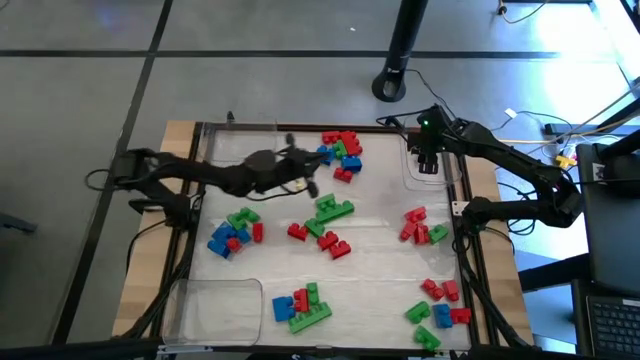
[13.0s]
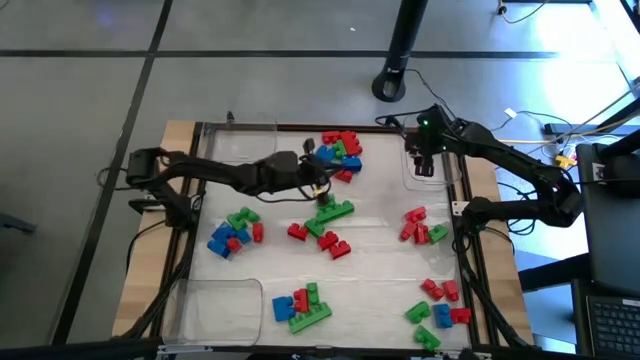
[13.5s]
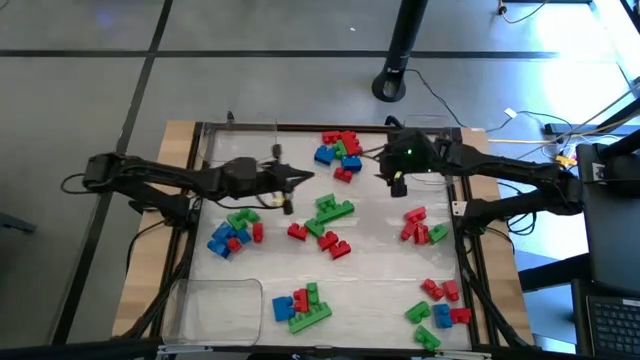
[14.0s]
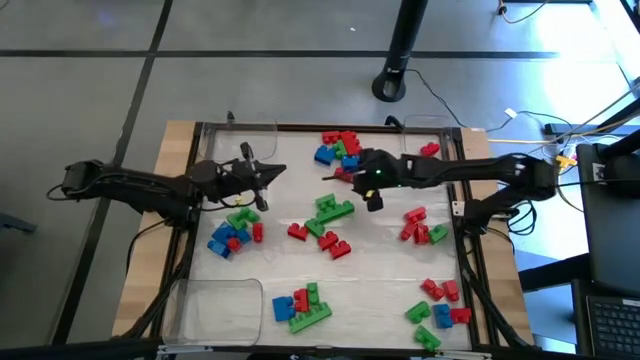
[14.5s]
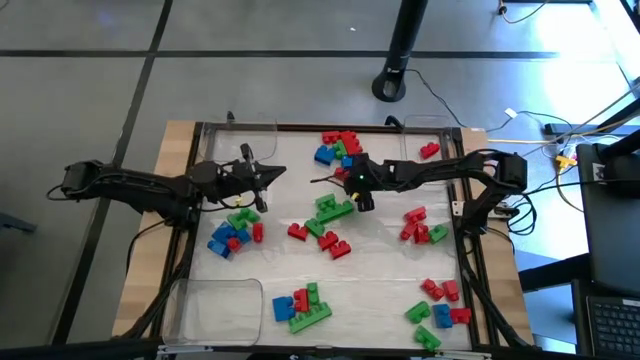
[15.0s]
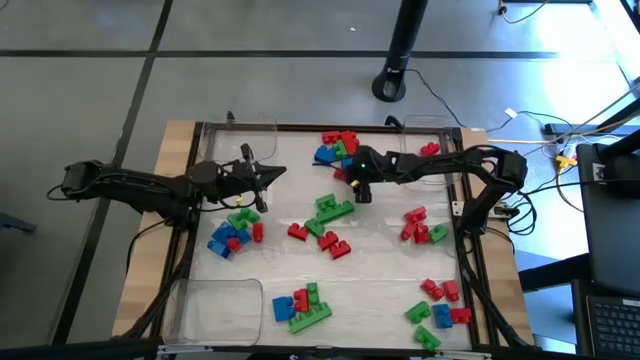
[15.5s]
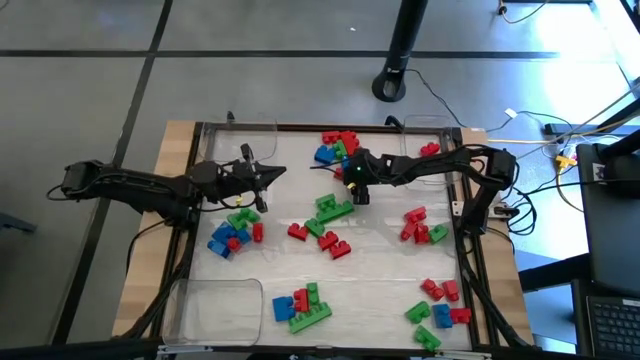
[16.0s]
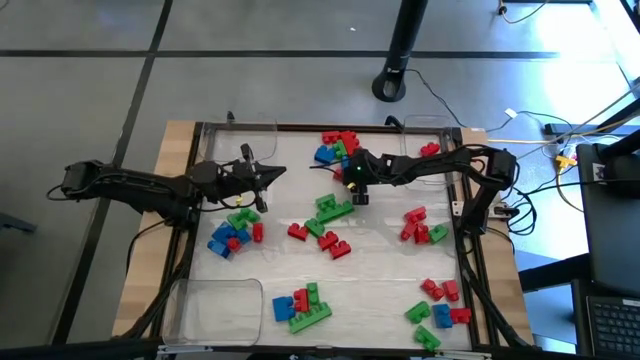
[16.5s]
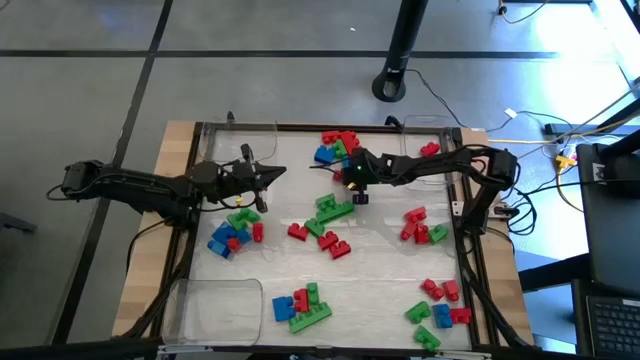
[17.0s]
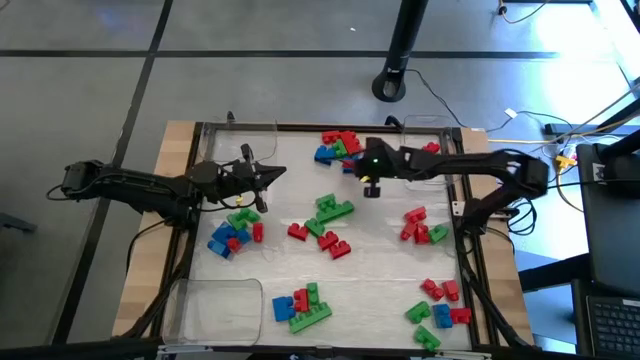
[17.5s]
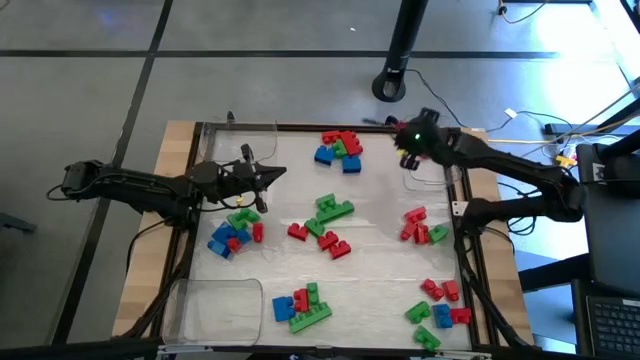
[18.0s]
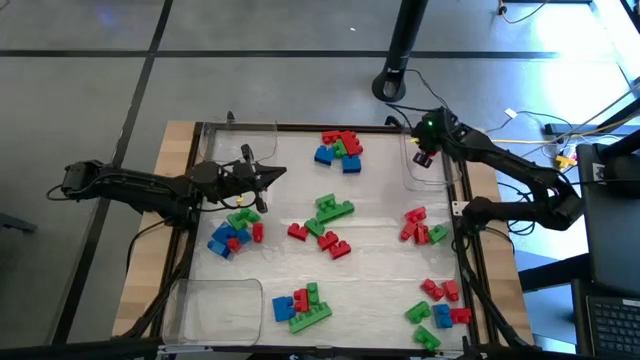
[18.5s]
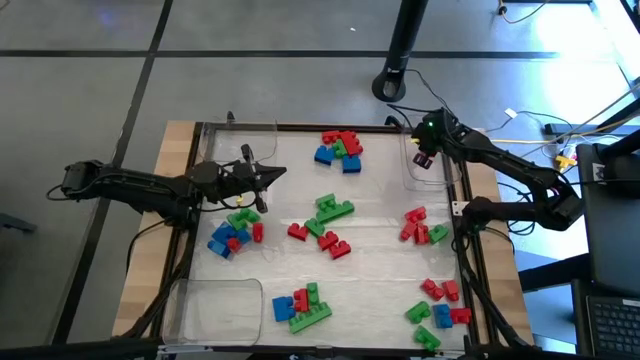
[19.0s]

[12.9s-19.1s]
Task: Sort blocks
Put the red game piece into the right transparent bin

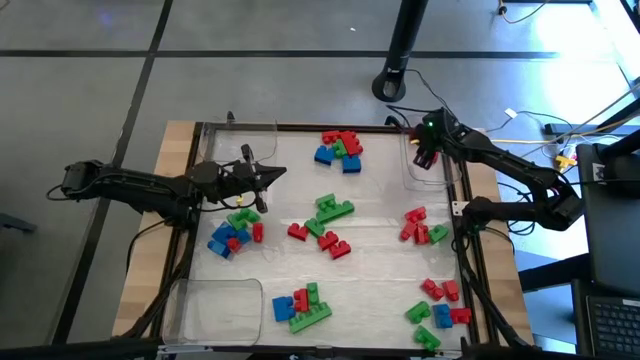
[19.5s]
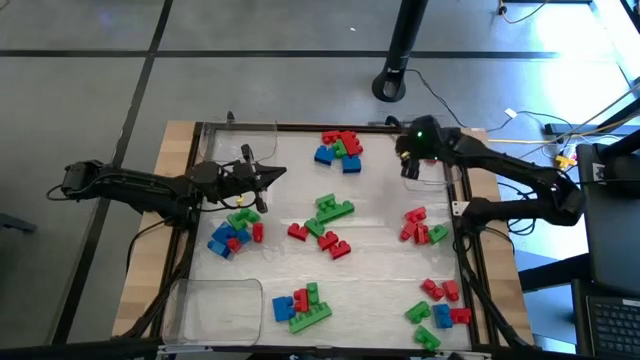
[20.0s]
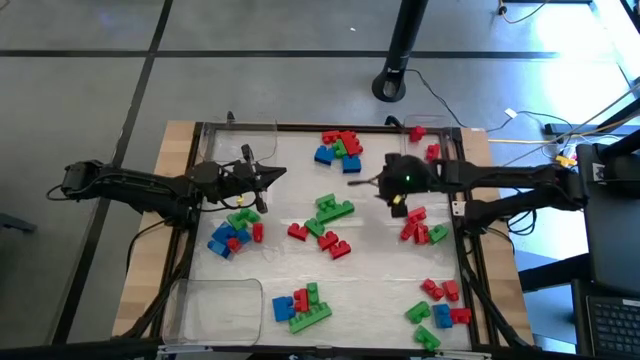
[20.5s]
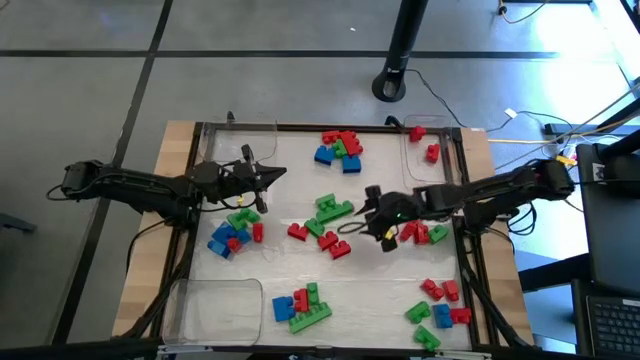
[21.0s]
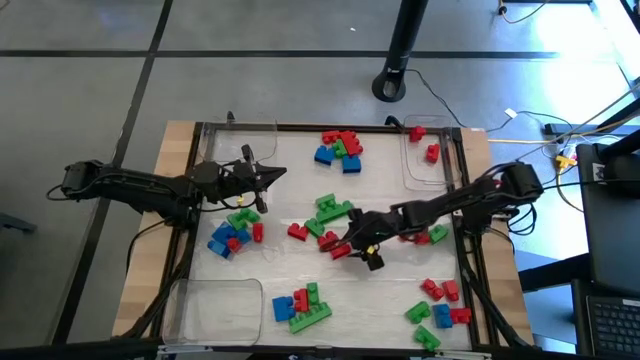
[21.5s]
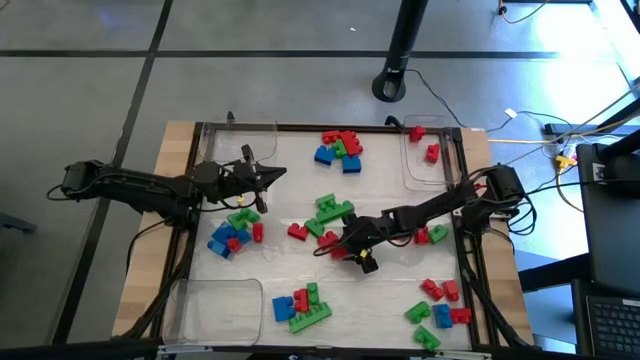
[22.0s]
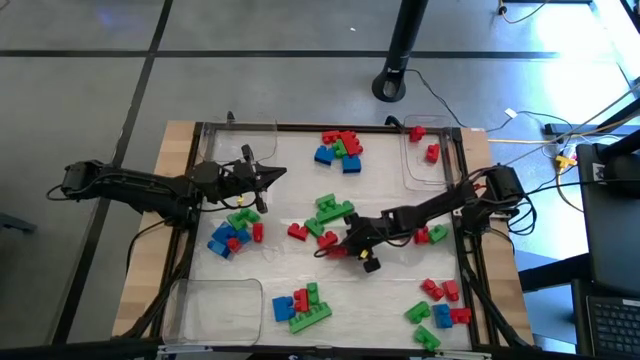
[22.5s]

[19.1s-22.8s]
Put the red game piece into the right transparent bin

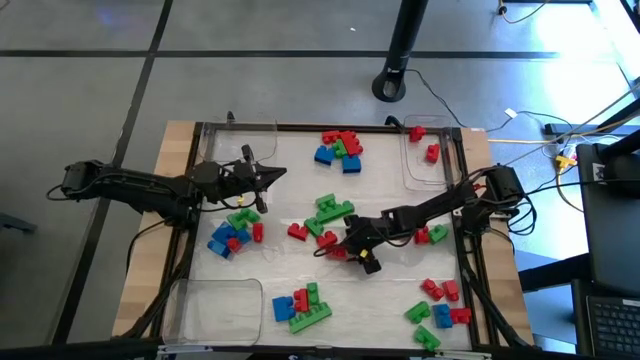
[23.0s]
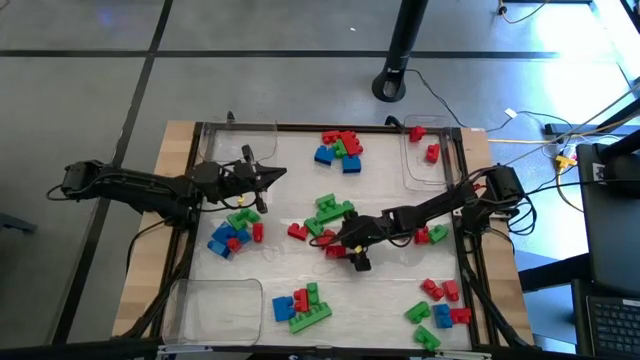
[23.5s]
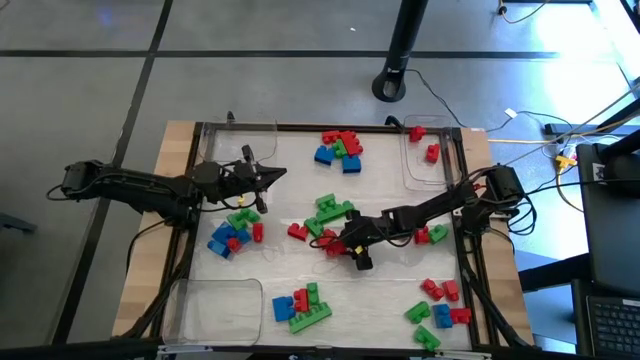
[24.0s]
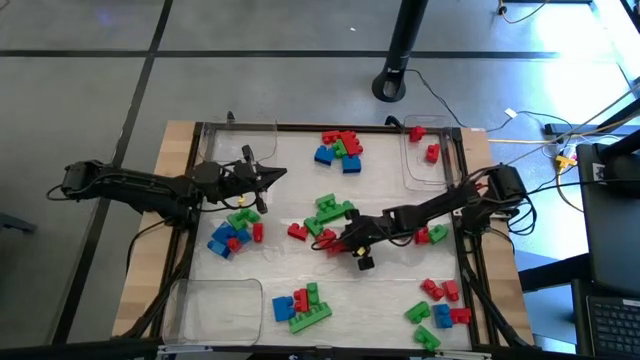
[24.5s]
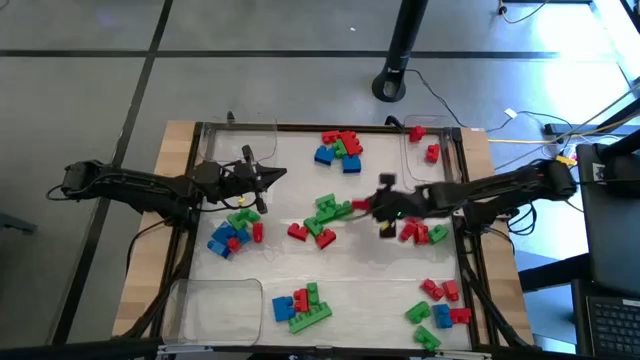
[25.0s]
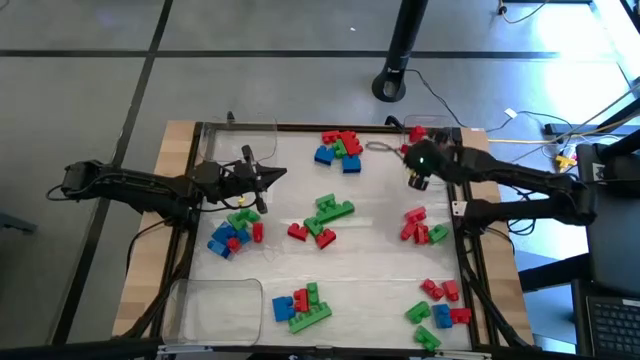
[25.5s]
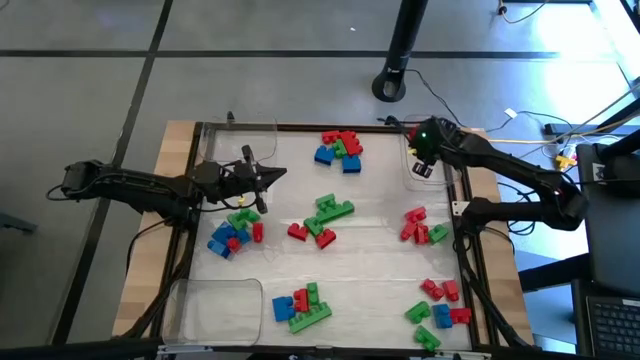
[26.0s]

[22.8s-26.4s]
Put the red game piece into the right transparent bin

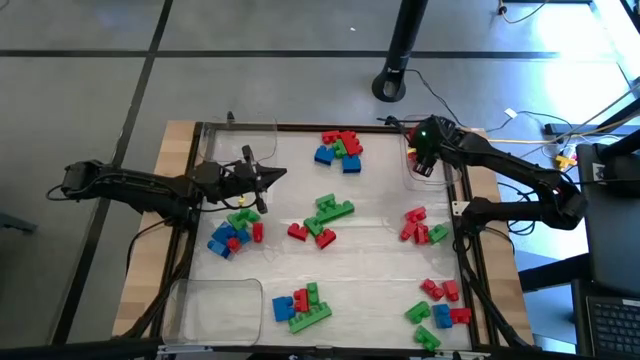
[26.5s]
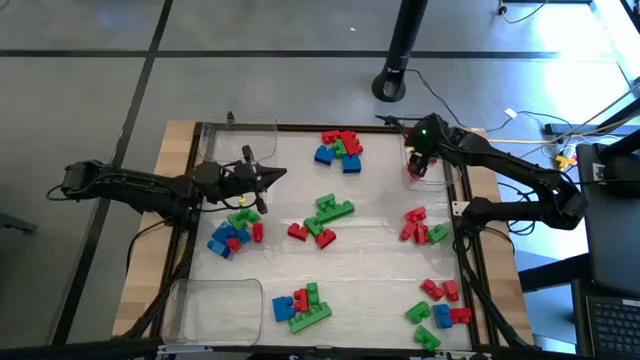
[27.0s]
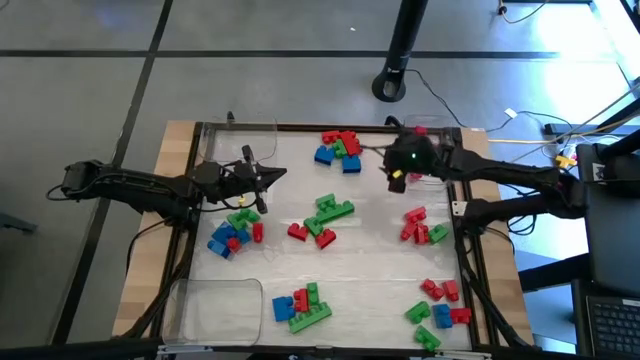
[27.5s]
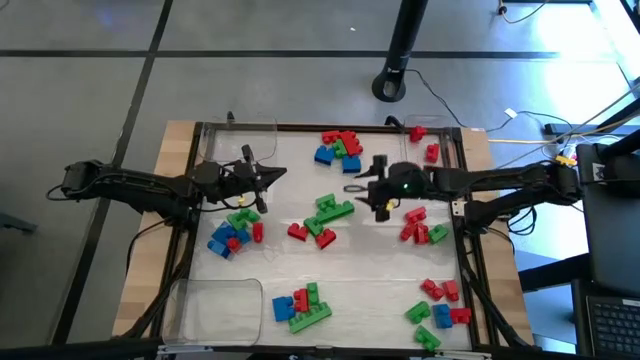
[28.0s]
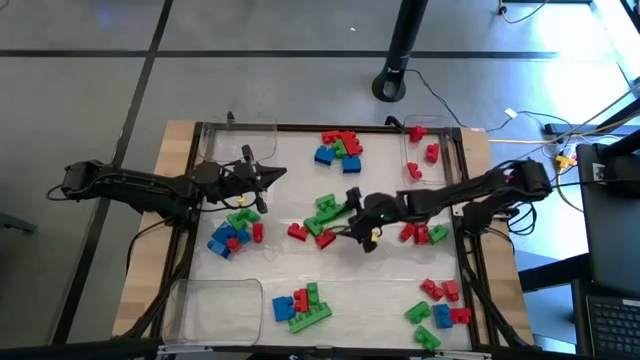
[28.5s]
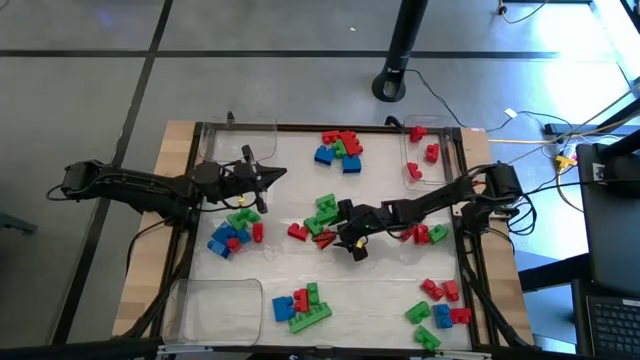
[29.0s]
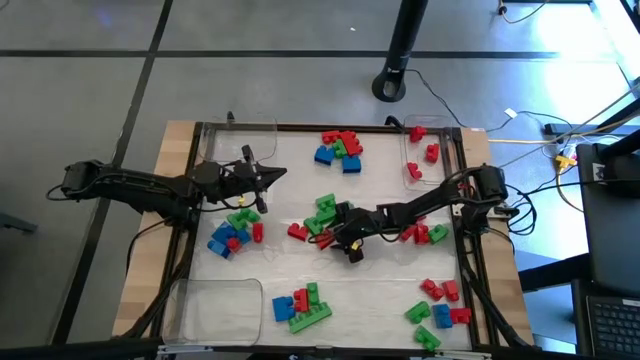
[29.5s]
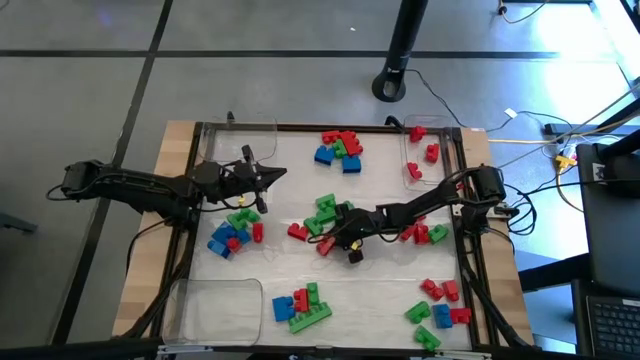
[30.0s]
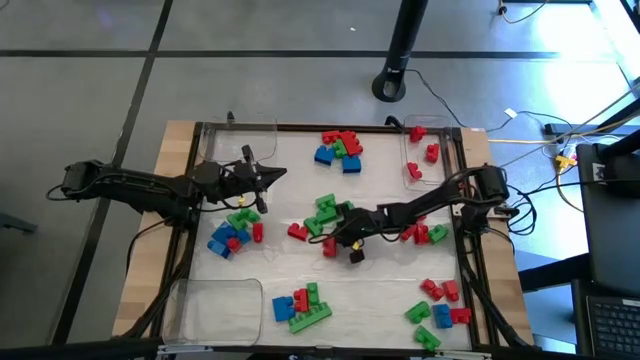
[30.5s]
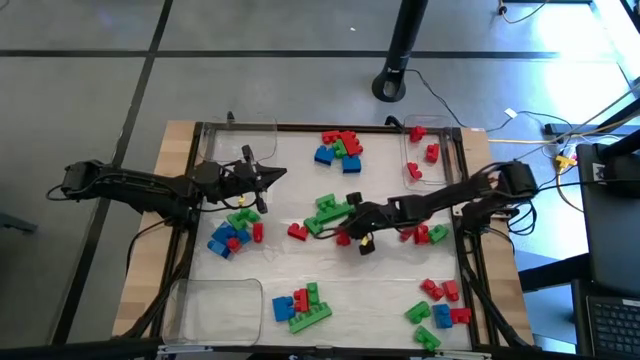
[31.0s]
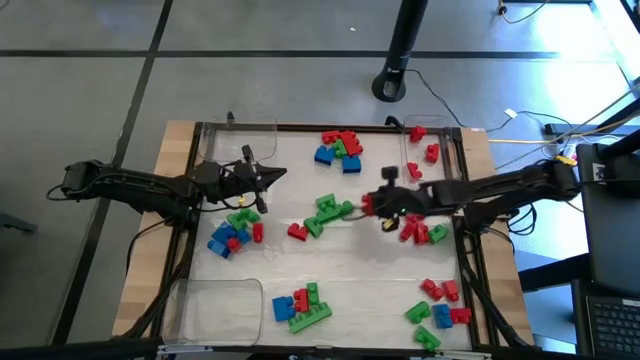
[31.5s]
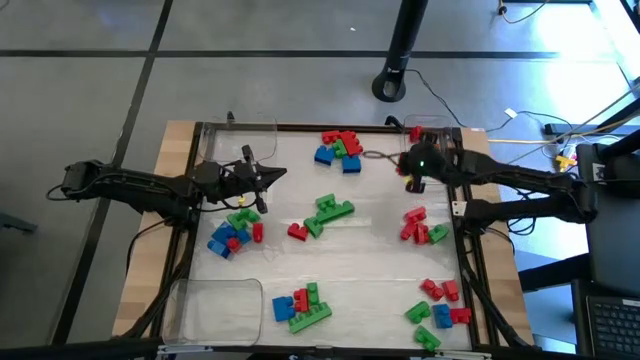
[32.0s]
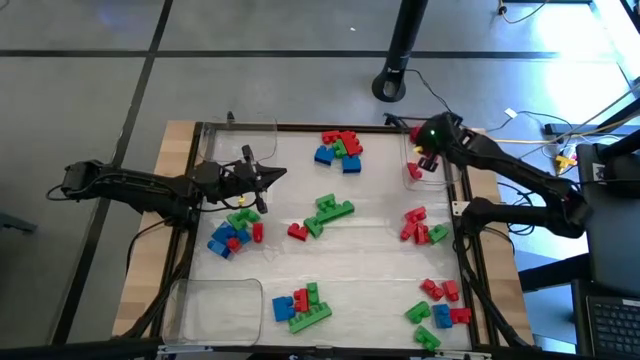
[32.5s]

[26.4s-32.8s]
Put the red game piece into the right transparent bin

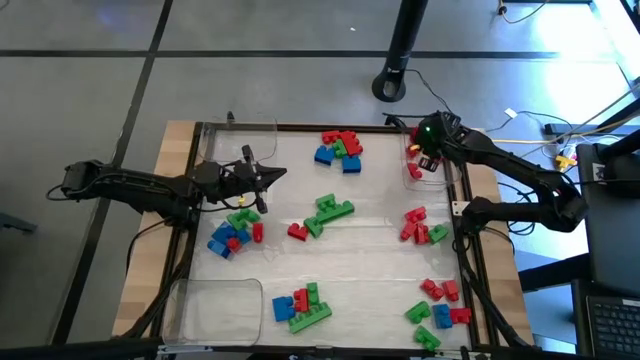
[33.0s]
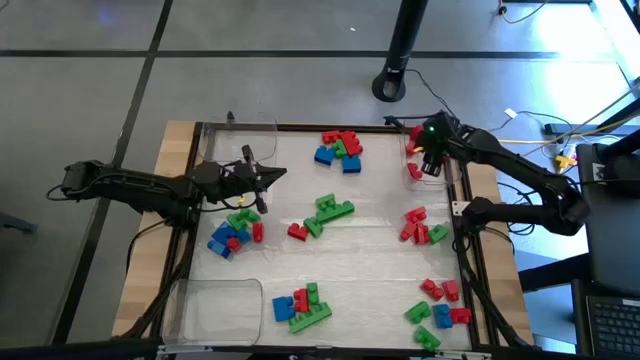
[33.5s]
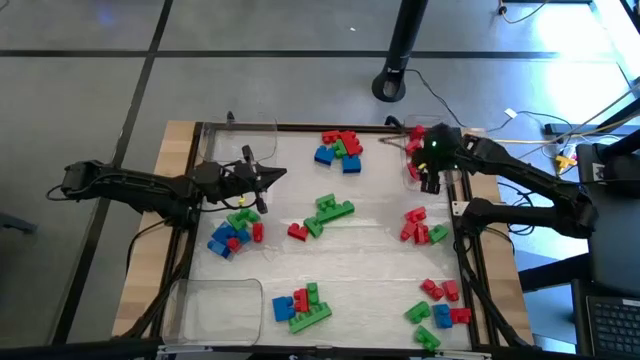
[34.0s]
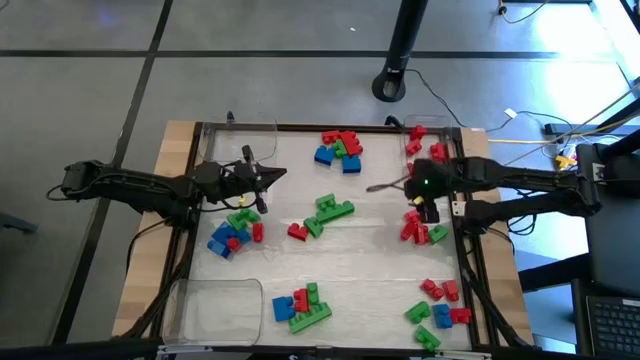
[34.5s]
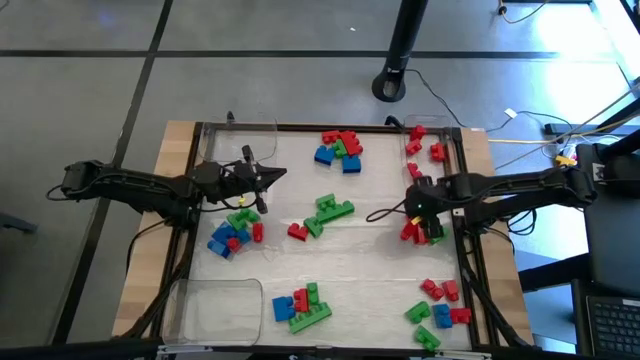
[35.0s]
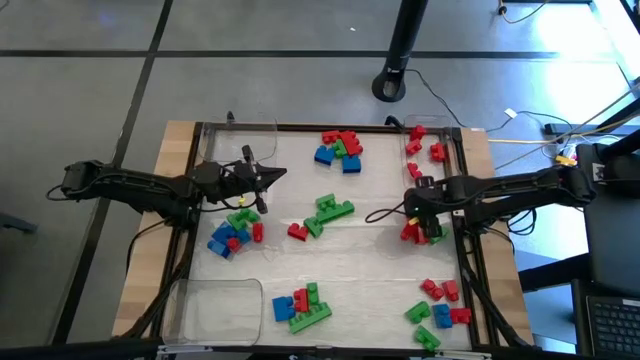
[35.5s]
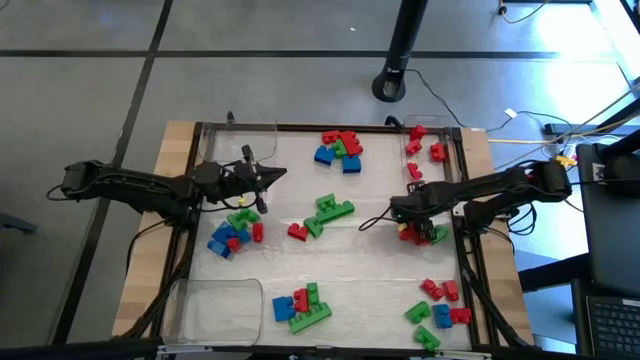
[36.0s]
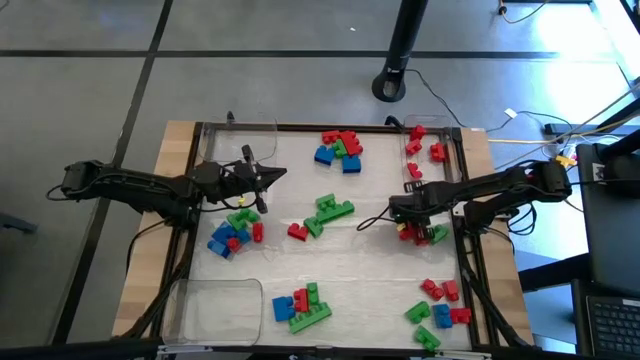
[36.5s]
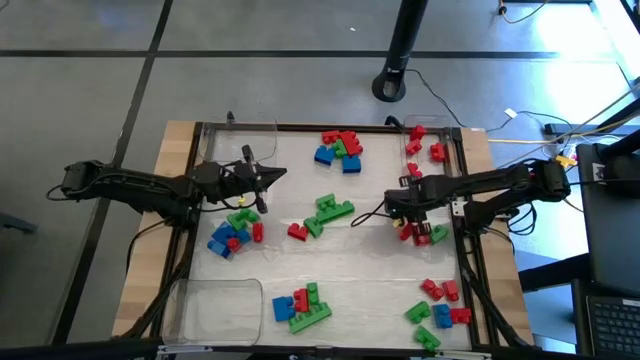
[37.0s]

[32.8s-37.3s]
Put the red game piece into the right transparent bin
